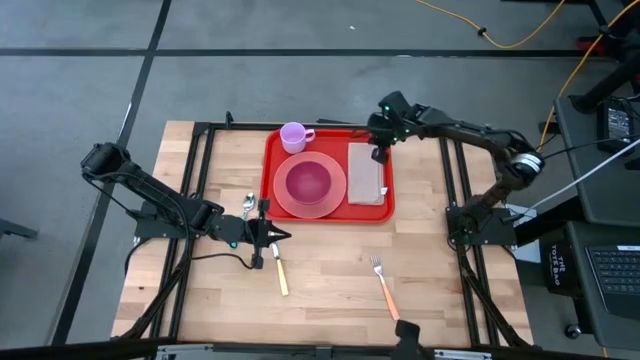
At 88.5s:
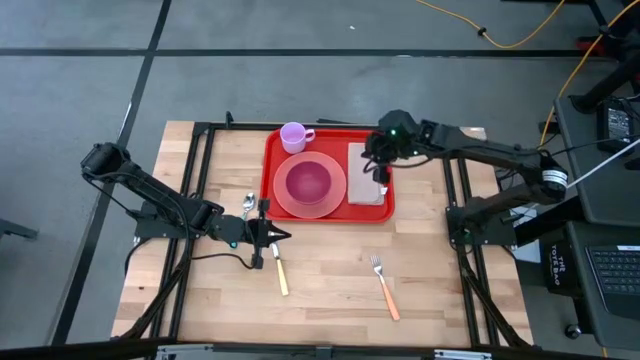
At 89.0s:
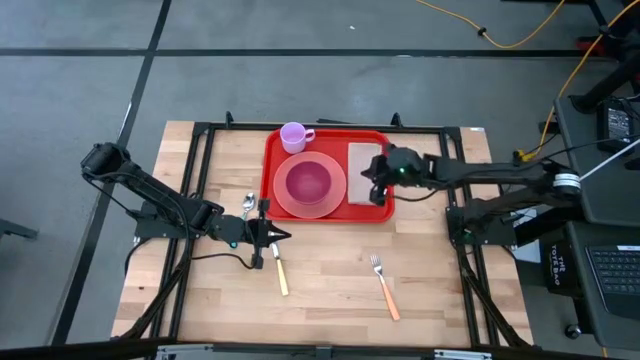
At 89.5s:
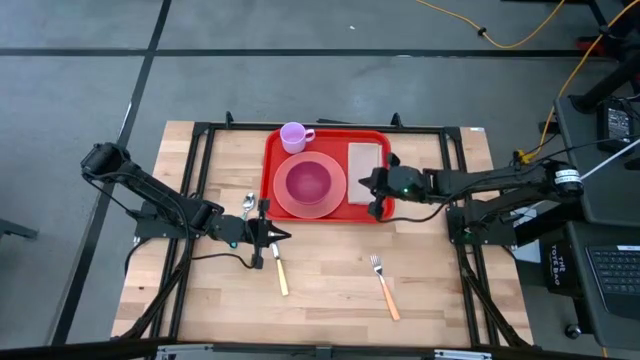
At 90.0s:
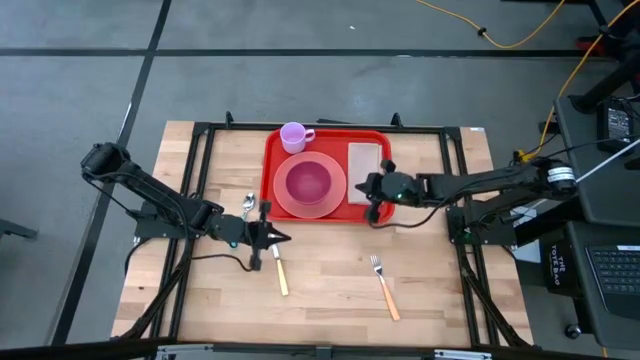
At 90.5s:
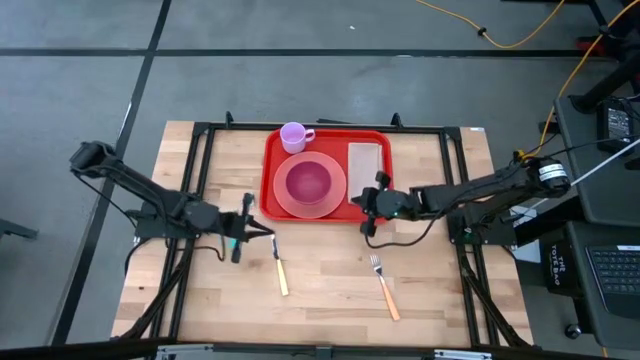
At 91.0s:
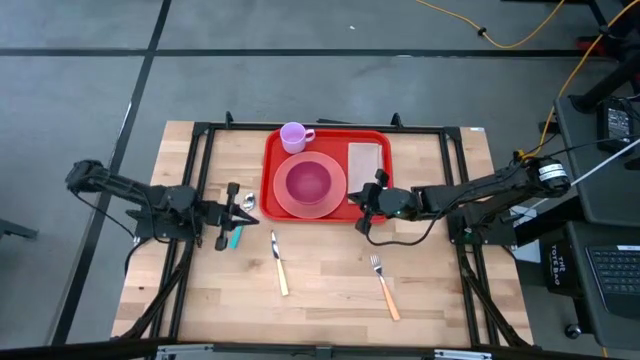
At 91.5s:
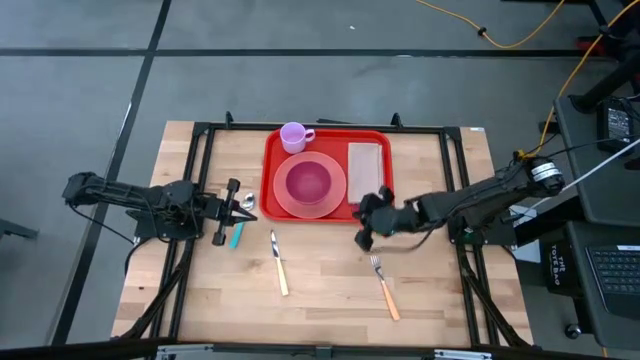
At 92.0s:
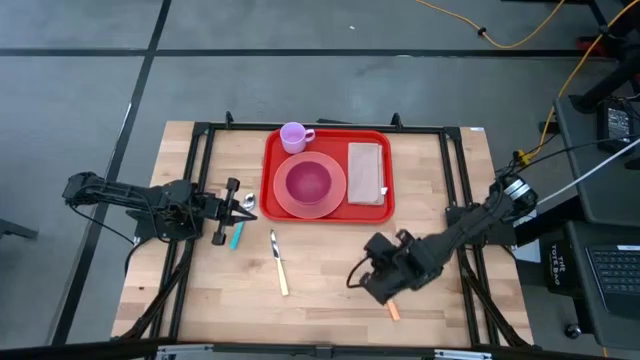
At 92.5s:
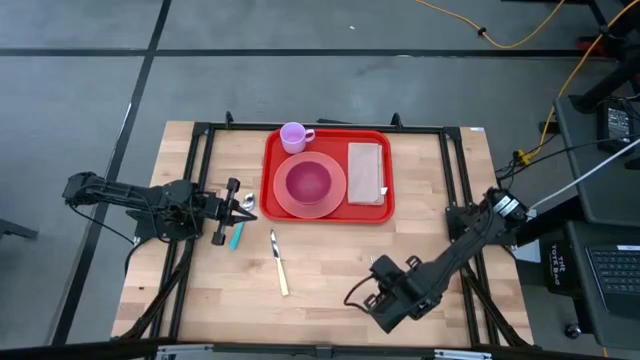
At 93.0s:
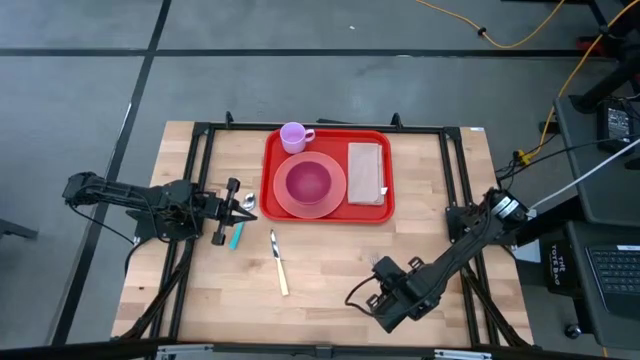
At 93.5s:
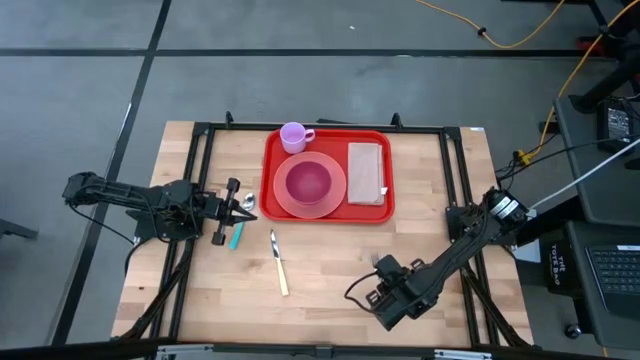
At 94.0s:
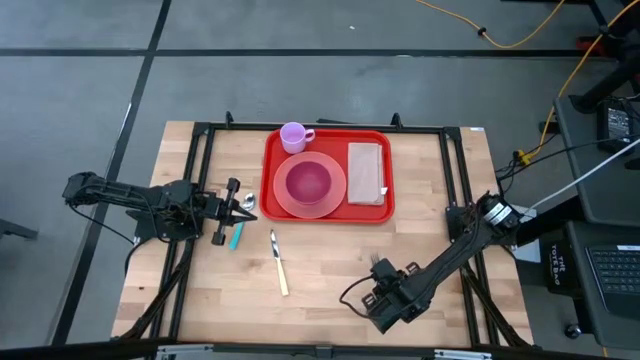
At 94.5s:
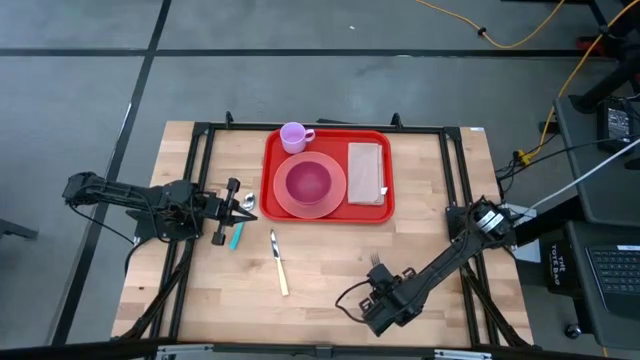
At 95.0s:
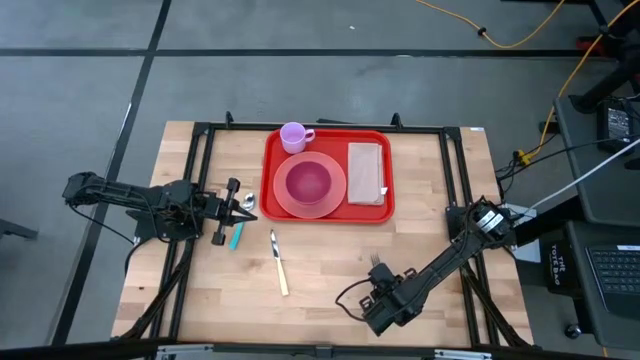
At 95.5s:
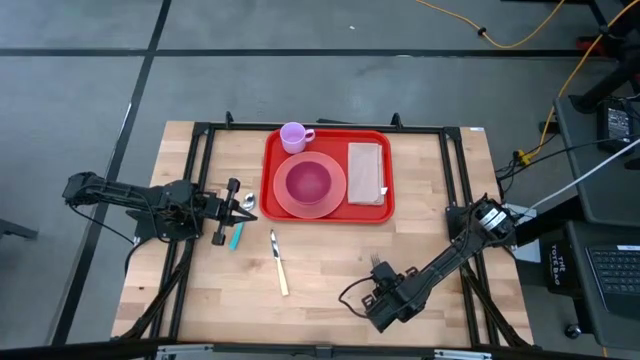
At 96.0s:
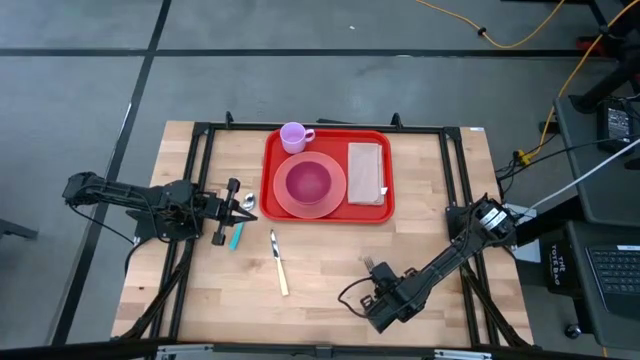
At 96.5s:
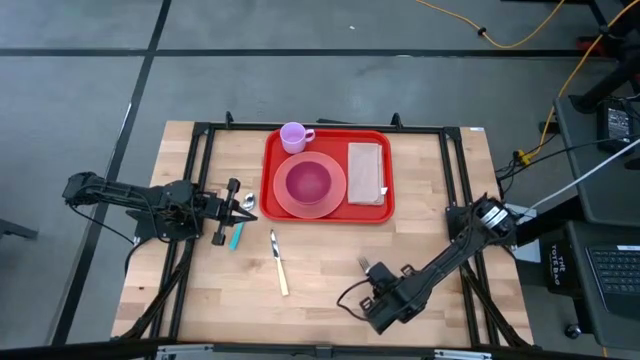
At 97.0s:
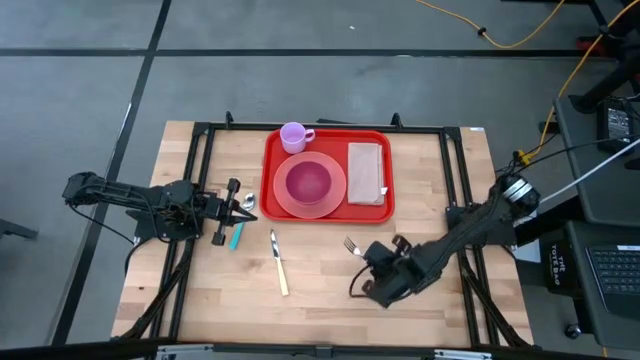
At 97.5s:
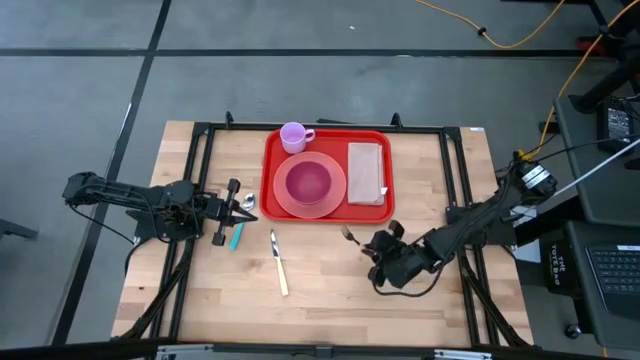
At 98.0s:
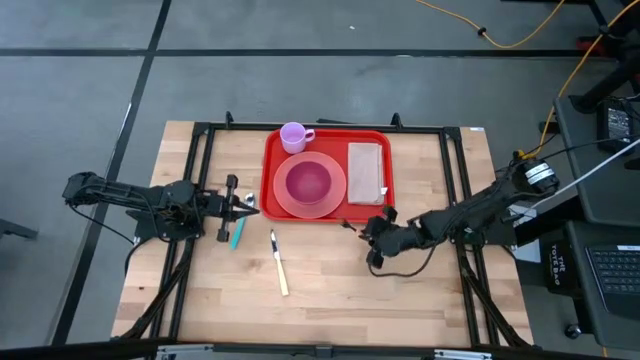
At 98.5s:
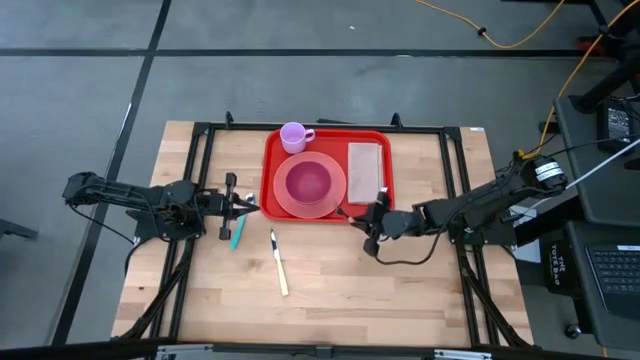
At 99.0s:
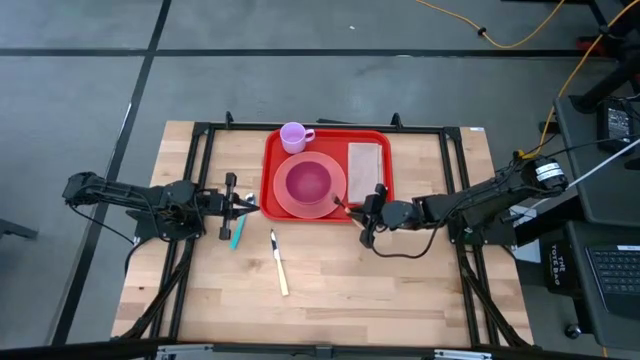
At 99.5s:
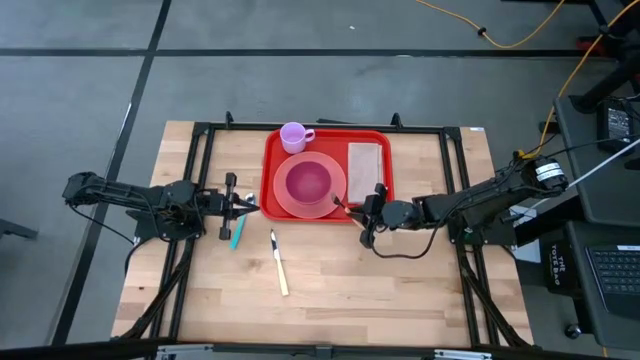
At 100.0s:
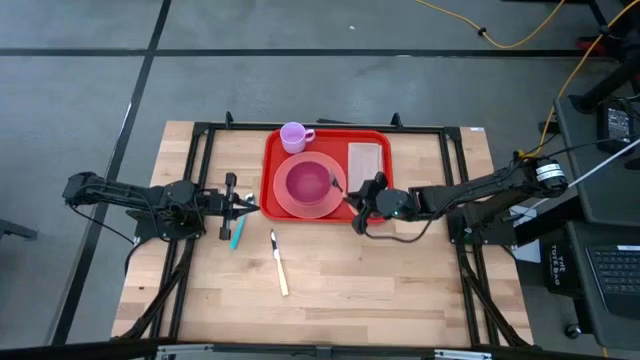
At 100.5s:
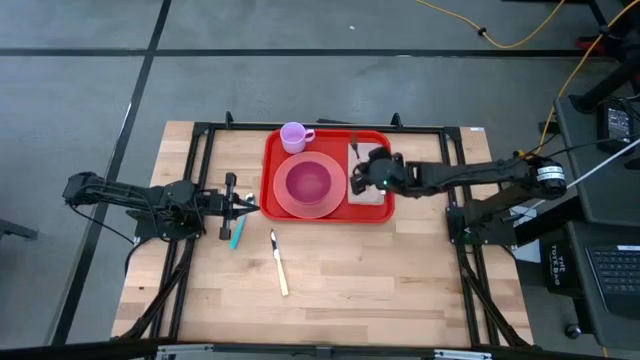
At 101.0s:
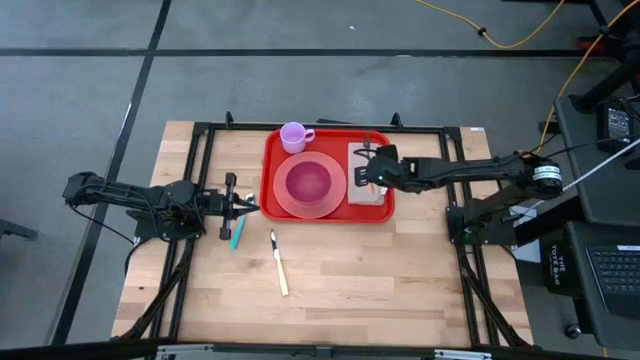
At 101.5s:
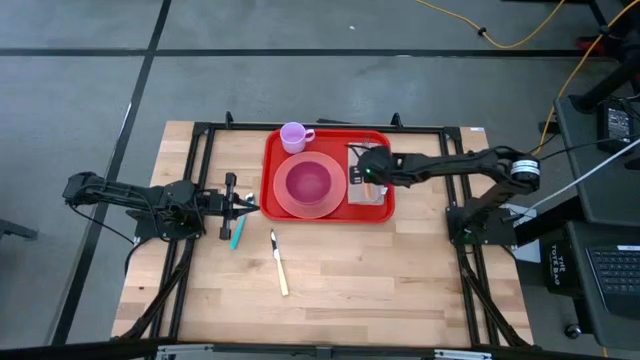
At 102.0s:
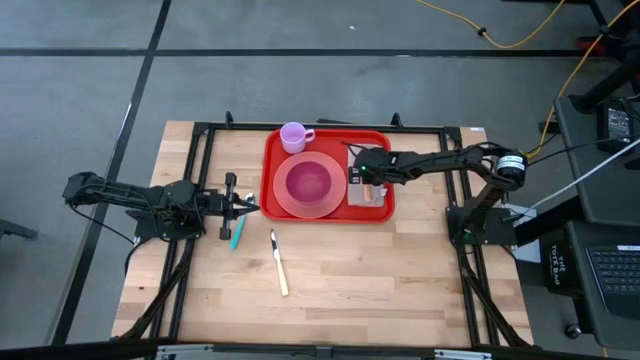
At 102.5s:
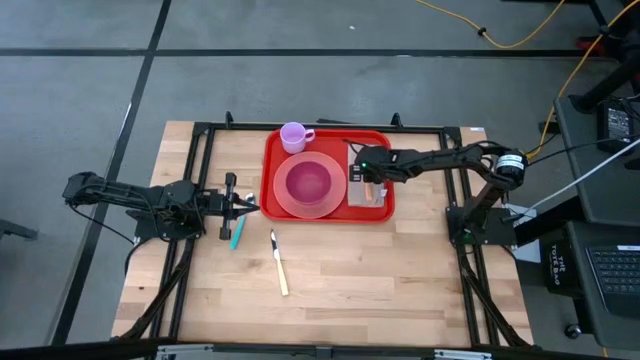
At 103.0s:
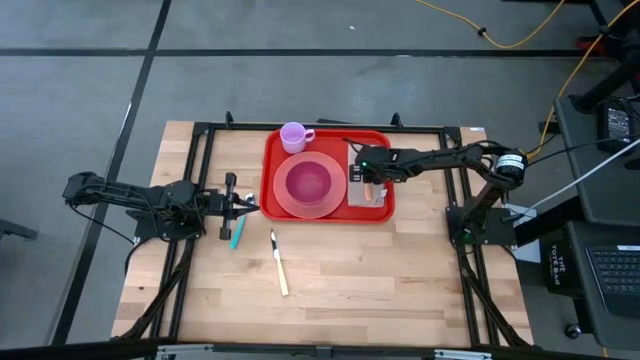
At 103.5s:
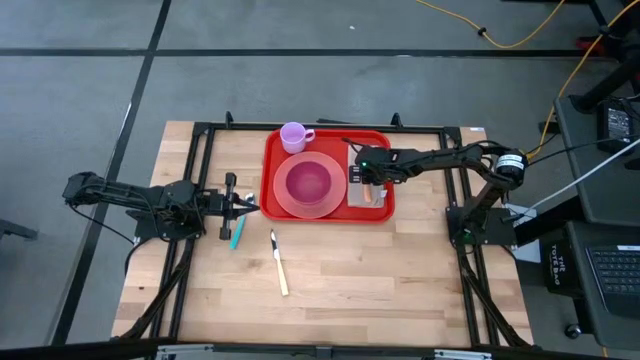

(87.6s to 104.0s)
Task: Set up tray
Put the orange fork on top of the brown napkin

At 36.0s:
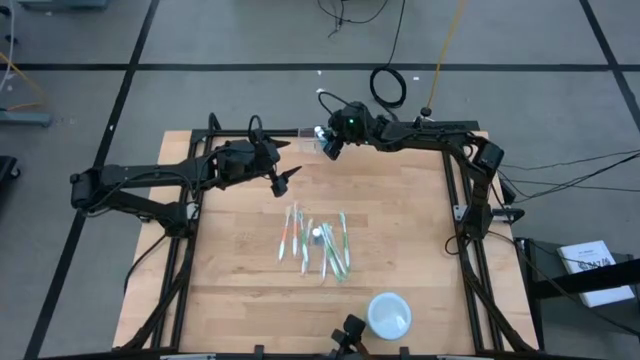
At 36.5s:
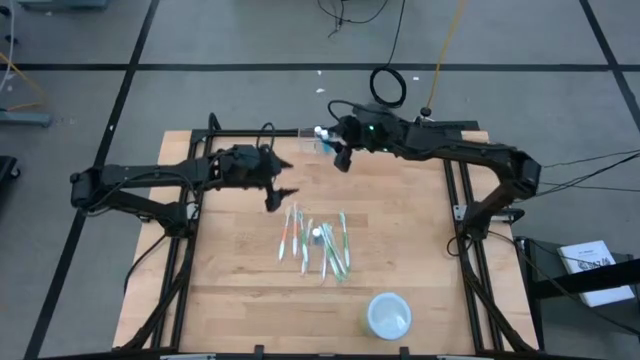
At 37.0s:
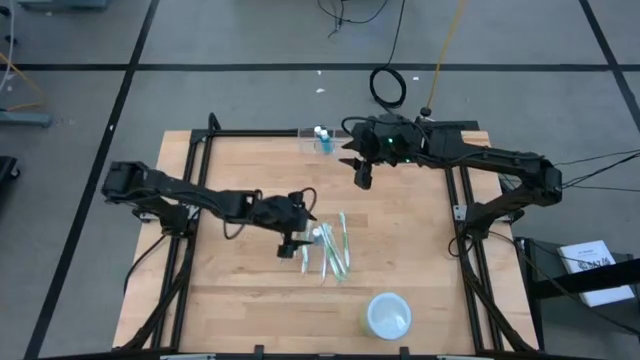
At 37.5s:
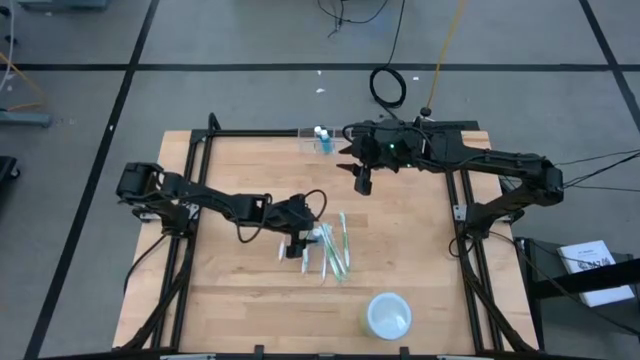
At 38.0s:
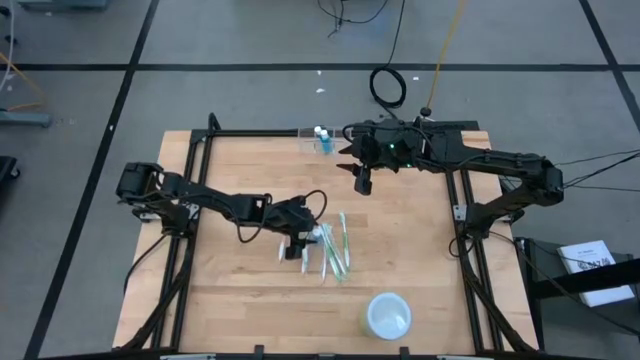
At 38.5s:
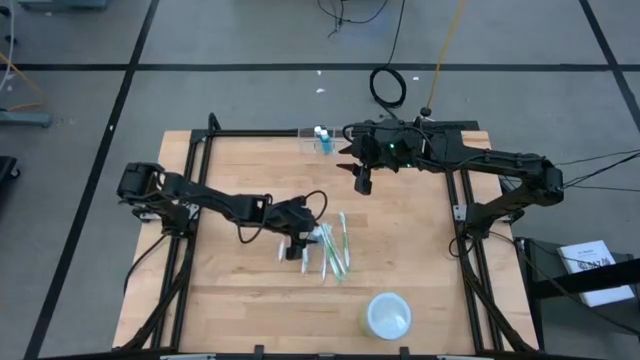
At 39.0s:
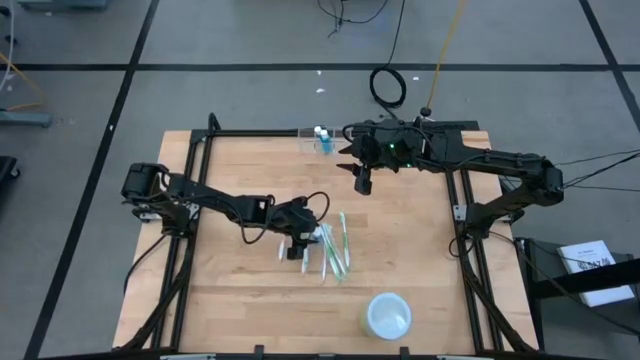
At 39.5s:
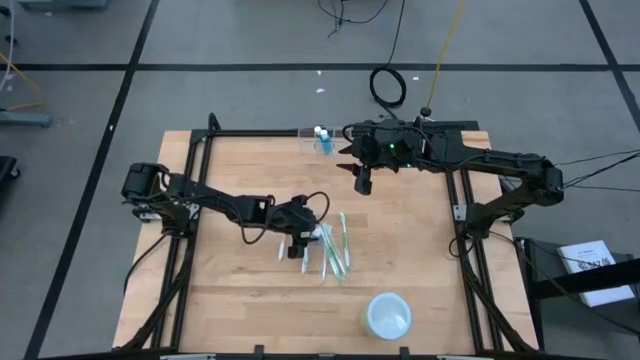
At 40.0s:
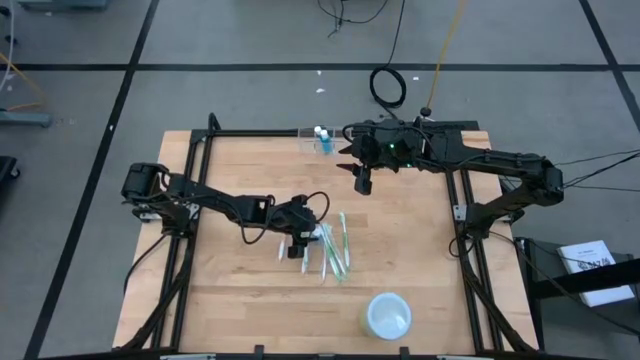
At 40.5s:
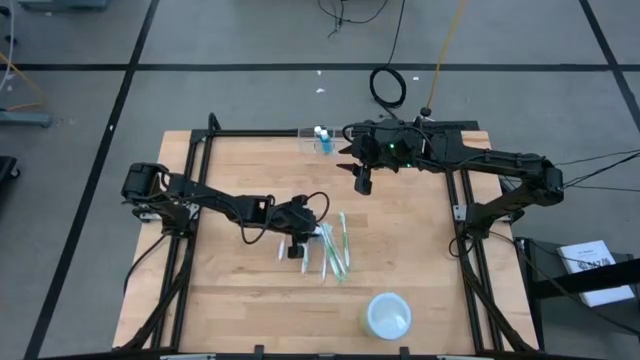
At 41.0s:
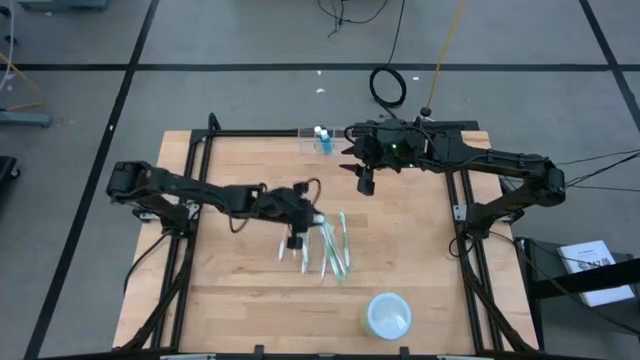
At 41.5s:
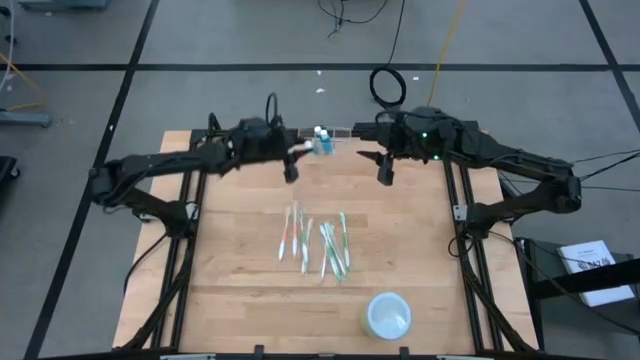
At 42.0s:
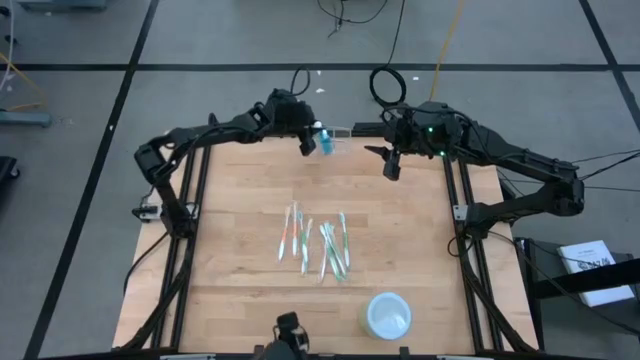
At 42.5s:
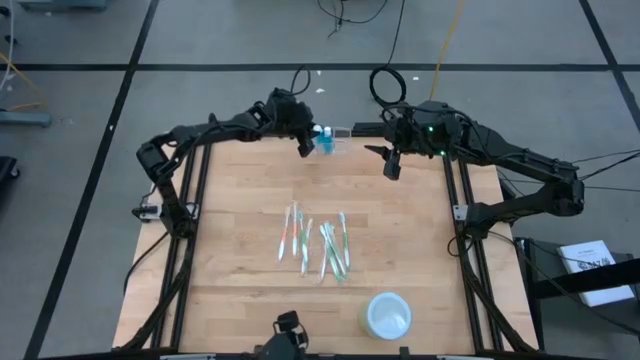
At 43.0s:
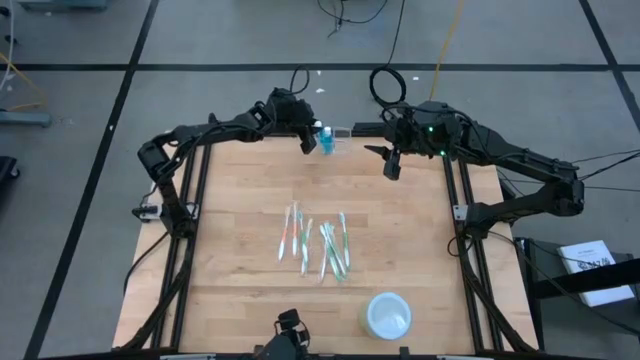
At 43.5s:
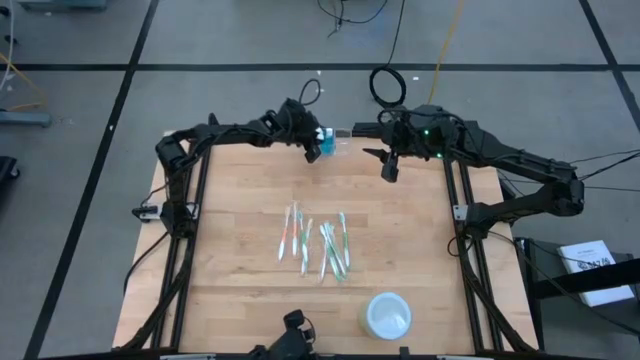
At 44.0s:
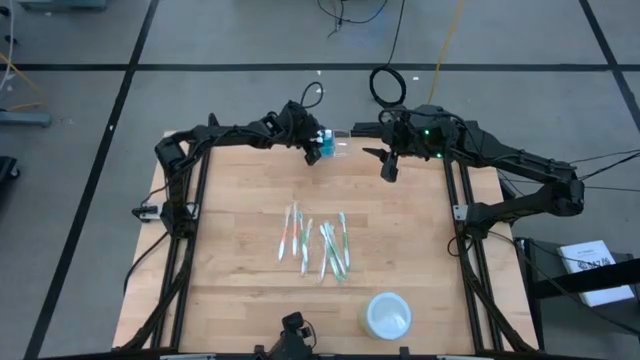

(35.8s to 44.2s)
Task: Pick & Place toothbrushing station
Put the blue mouthwash into the transparent organizer
